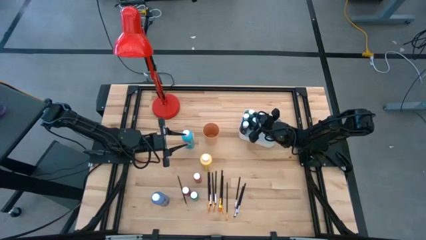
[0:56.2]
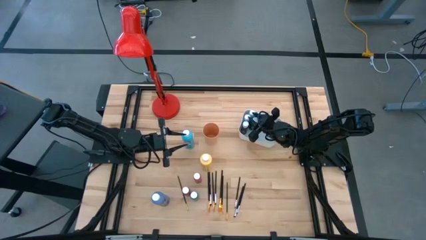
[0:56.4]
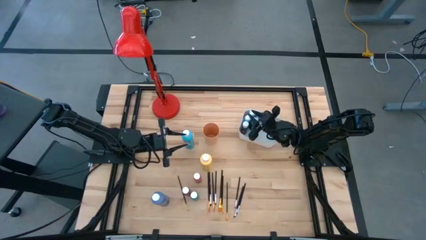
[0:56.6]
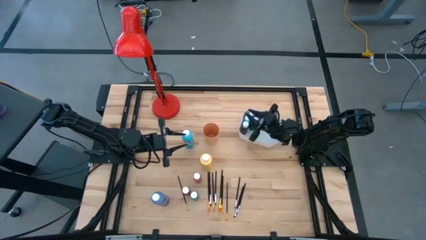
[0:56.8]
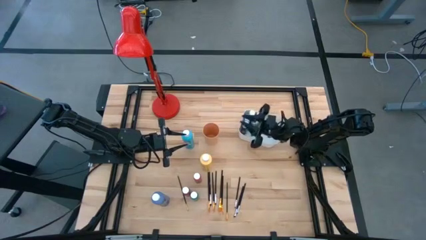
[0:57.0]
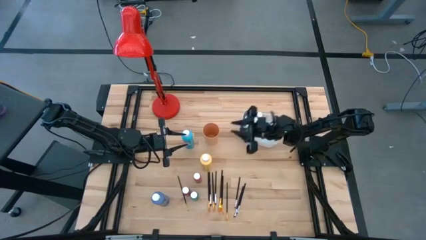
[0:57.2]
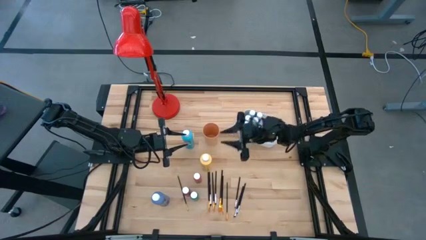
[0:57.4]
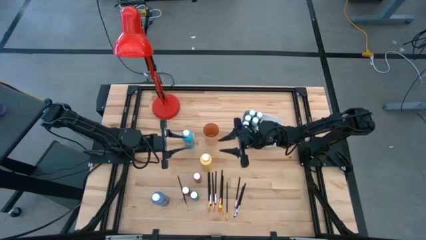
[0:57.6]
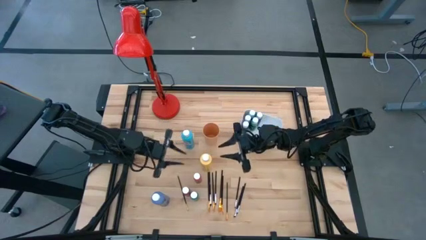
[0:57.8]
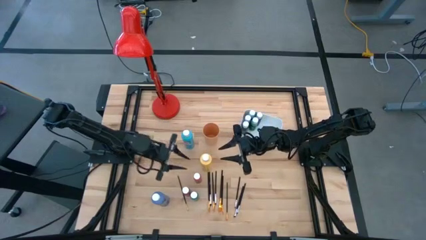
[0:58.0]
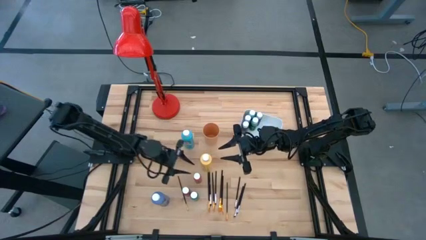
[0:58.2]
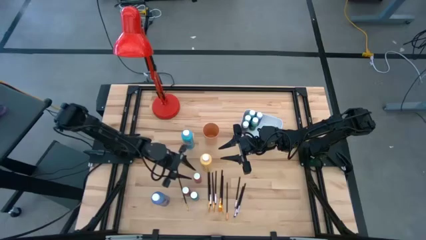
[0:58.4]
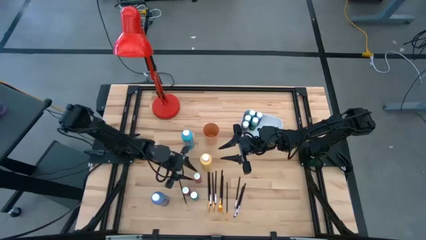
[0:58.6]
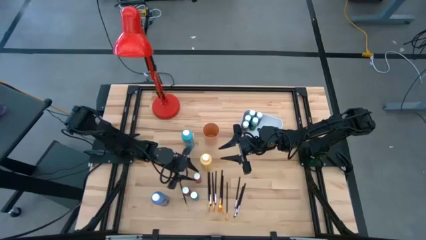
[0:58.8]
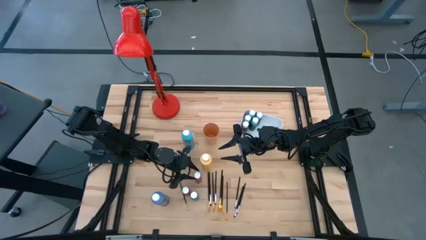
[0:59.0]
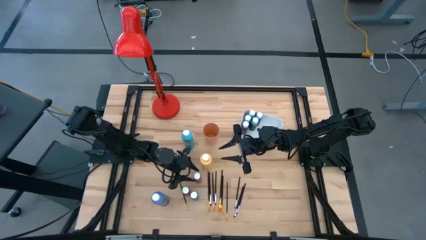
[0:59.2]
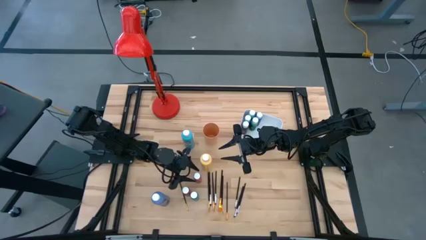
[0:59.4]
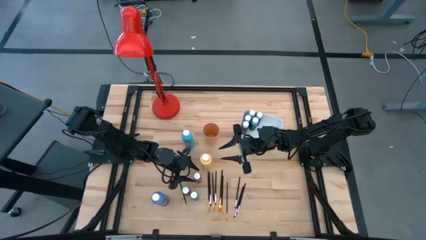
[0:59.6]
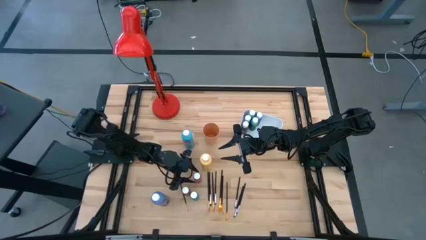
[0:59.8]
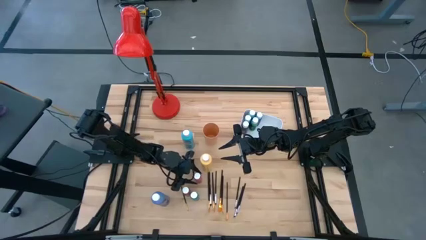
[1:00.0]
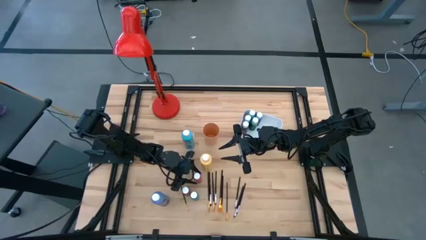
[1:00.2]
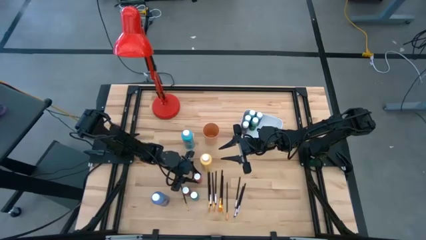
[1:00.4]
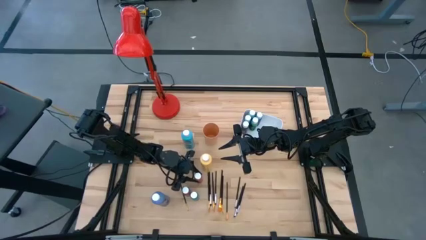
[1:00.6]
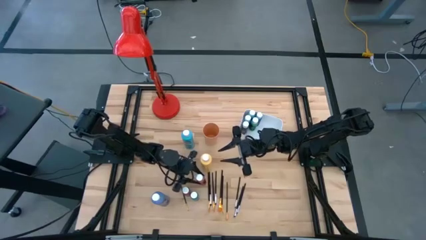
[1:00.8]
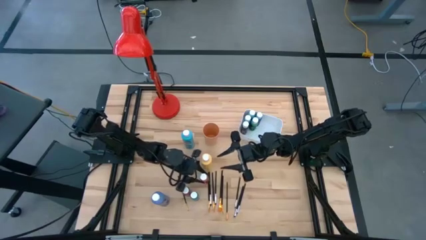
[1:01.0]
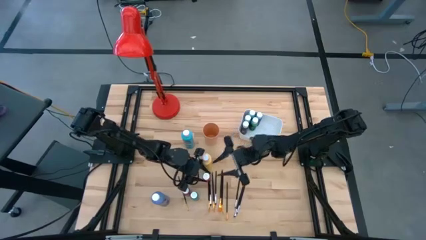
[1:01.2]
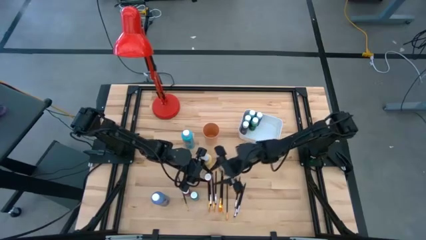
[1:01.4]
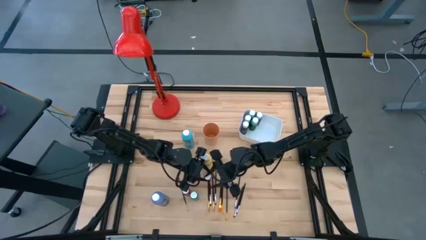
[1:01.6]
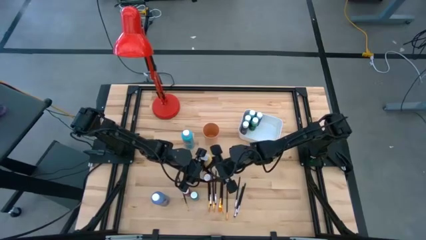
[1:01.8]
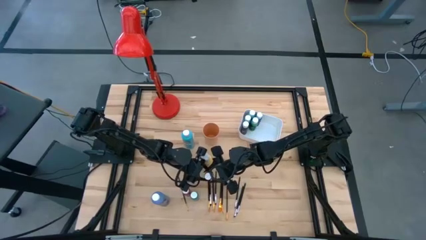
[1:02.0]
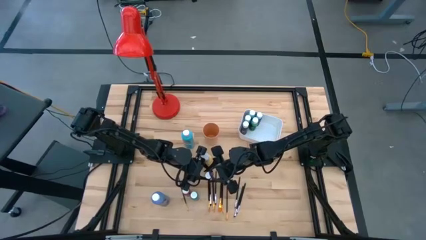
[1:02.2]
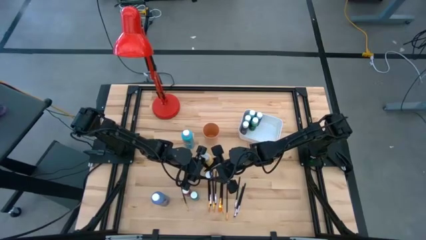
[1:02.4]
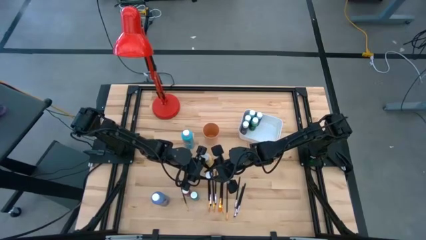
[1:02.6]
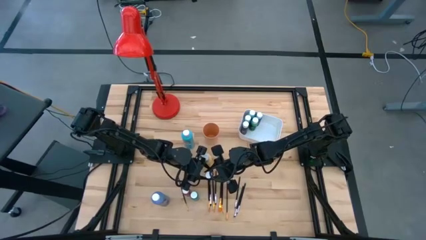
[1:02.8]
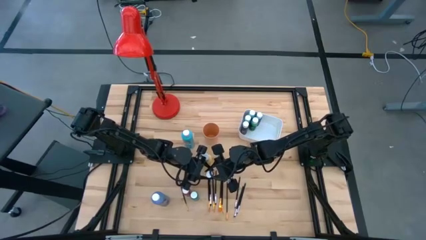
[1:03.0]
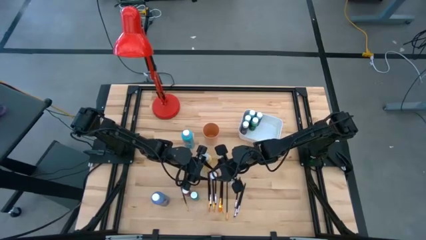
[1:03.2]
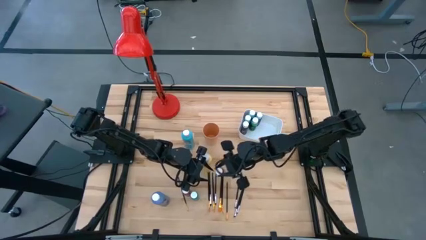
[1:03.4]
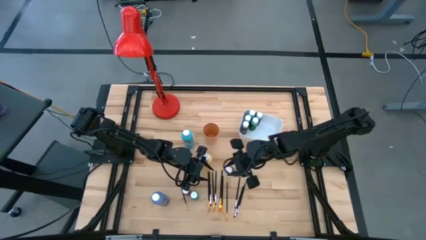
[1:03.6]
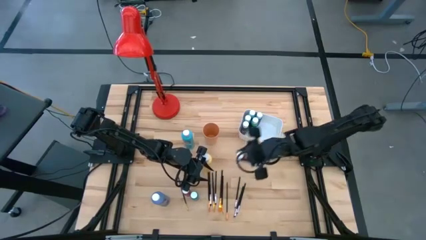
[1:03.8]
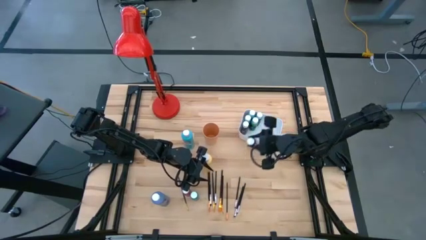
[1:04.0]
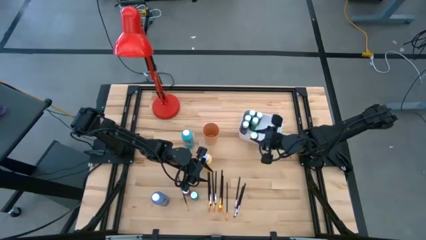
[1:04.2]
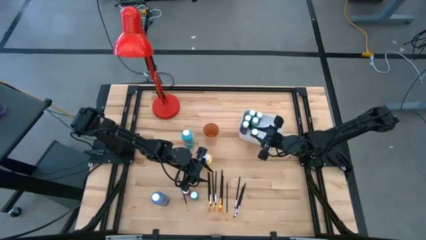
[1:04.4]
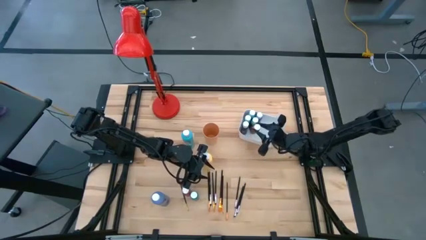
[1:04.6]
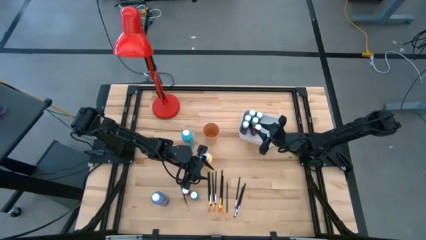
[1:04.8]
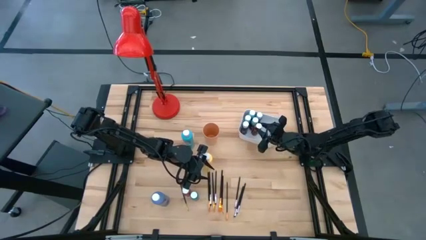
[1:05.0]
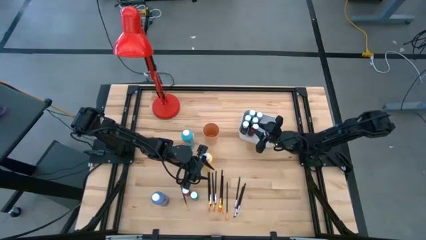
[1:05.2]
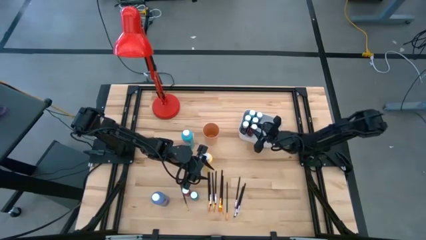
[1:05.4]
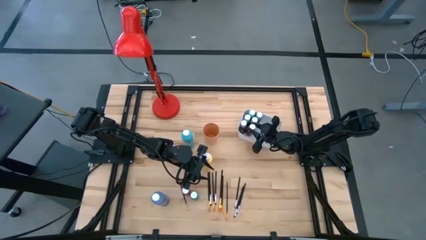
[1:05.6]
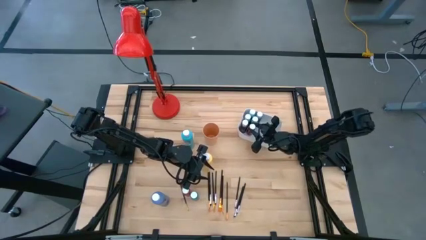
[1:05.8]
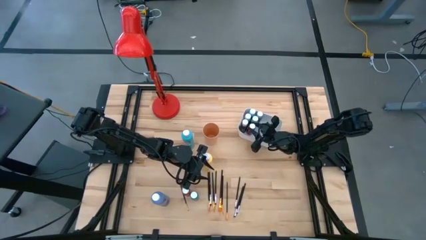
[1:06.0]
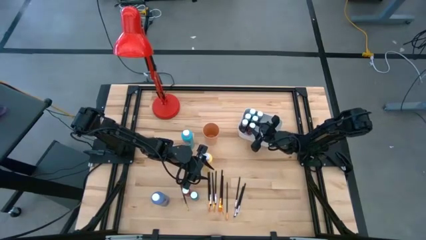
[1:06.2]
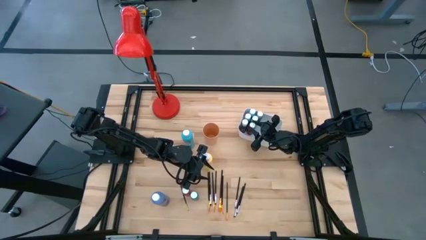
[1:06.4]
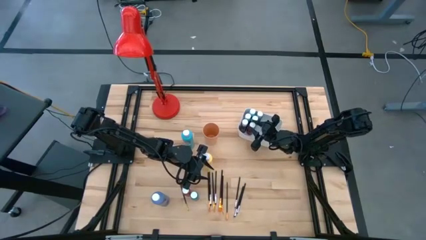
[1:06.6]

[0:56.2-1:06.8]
Task: Pick & Place Paint Supplies
Put the red paint bottle into the white bin
